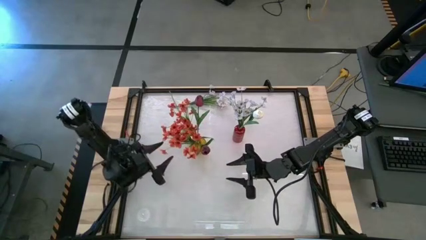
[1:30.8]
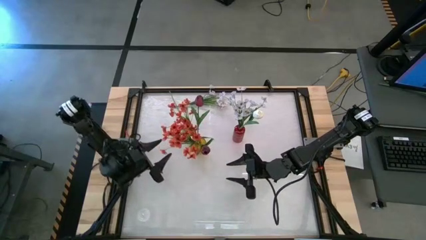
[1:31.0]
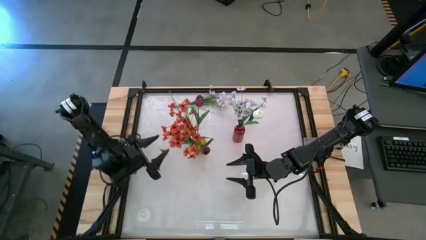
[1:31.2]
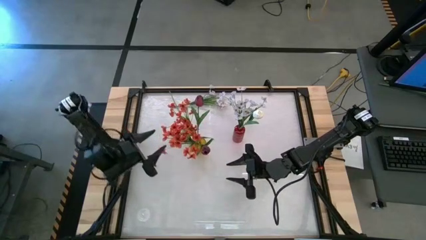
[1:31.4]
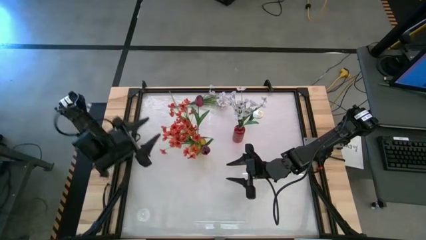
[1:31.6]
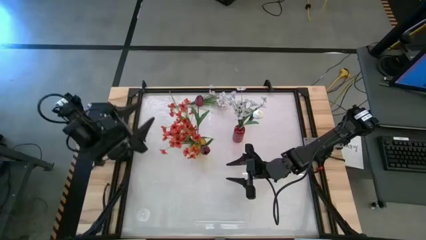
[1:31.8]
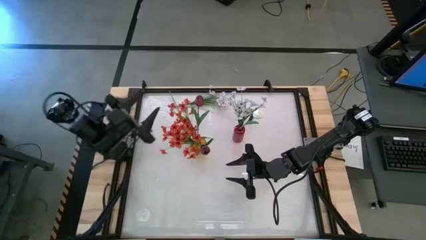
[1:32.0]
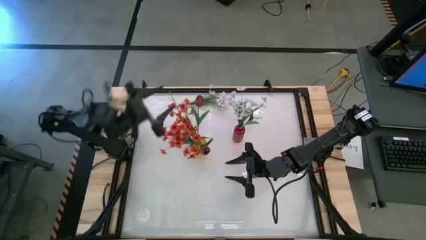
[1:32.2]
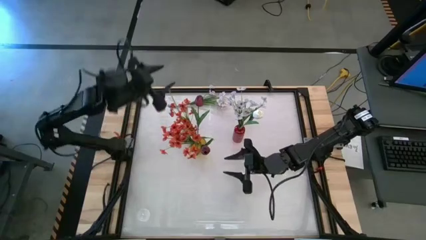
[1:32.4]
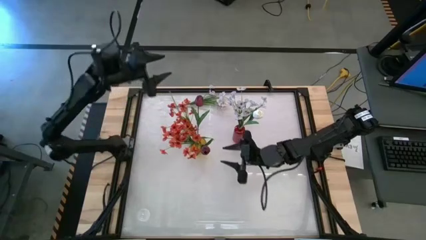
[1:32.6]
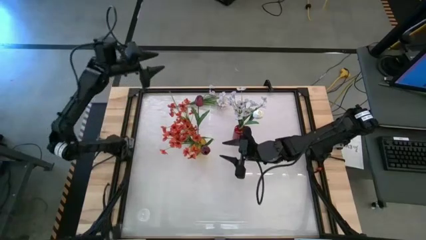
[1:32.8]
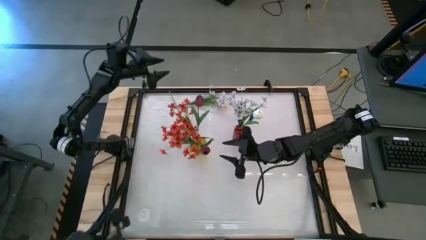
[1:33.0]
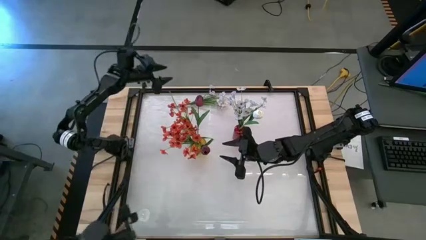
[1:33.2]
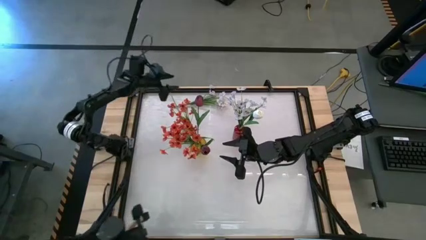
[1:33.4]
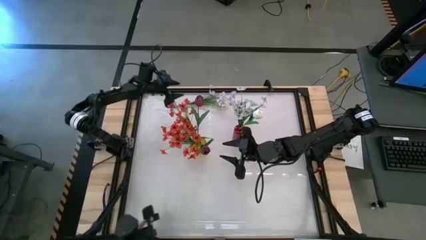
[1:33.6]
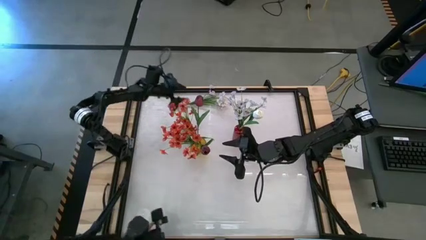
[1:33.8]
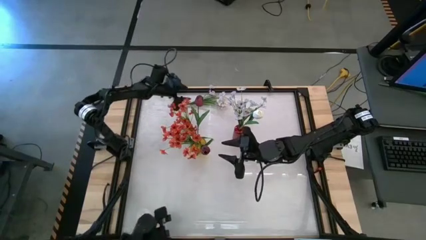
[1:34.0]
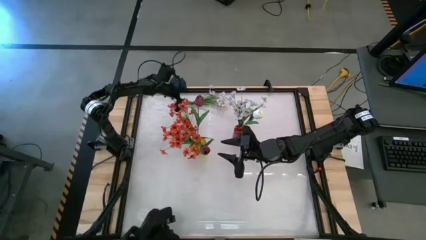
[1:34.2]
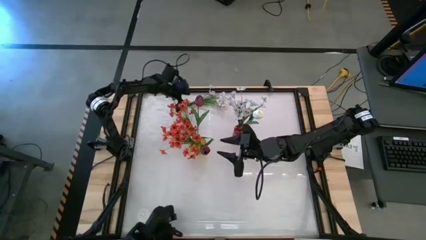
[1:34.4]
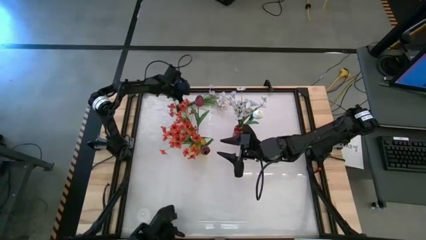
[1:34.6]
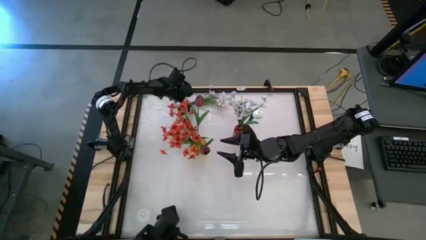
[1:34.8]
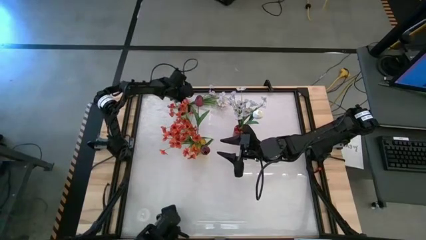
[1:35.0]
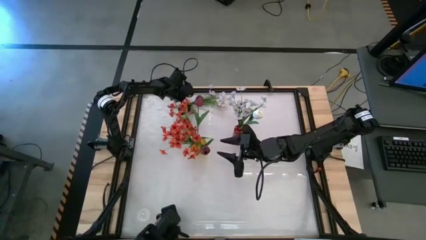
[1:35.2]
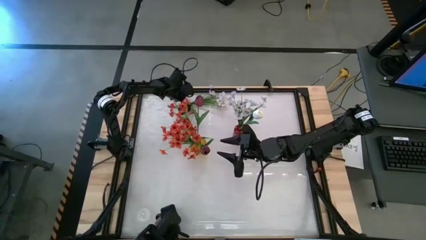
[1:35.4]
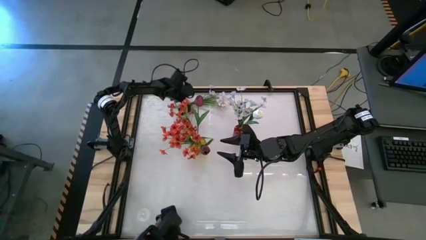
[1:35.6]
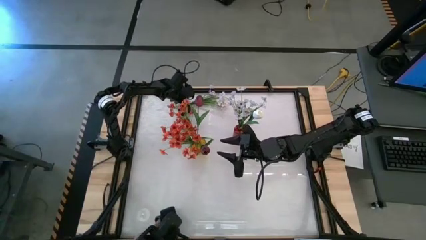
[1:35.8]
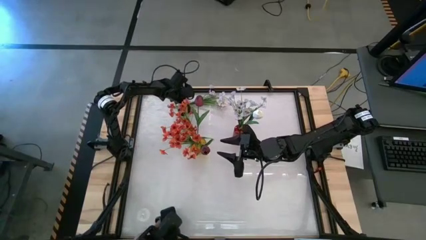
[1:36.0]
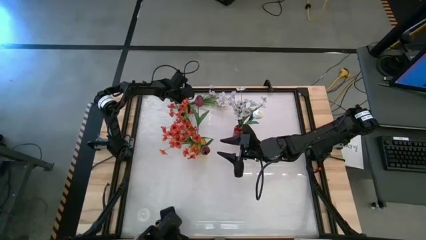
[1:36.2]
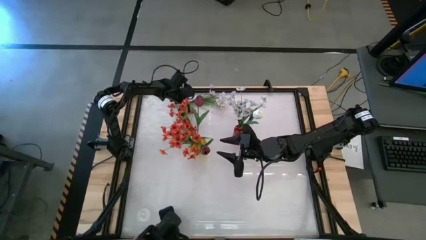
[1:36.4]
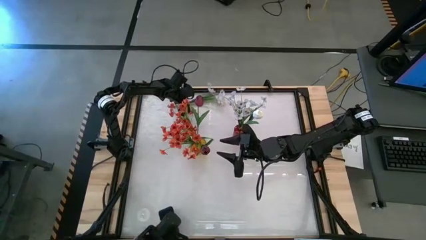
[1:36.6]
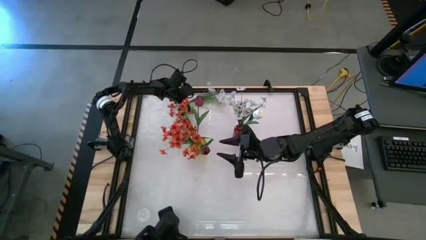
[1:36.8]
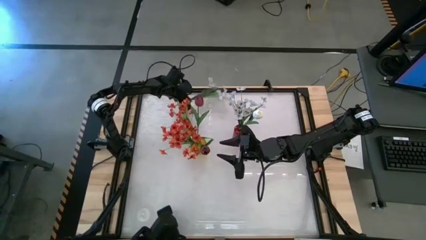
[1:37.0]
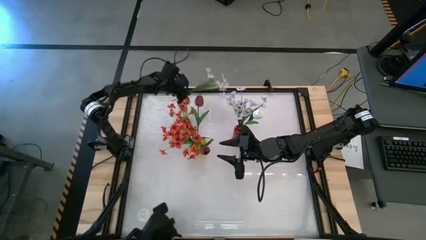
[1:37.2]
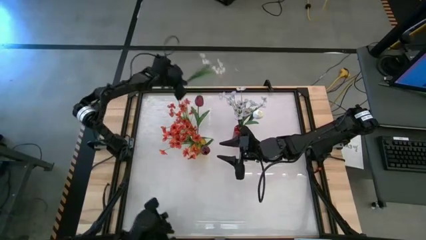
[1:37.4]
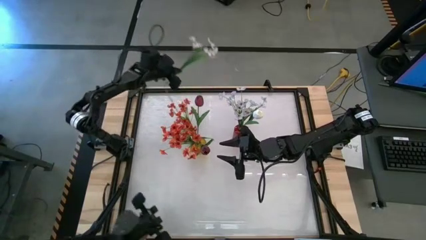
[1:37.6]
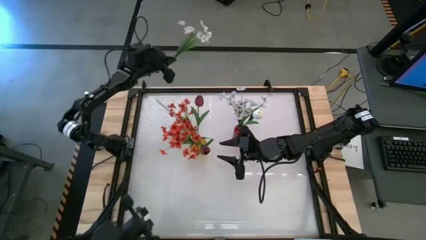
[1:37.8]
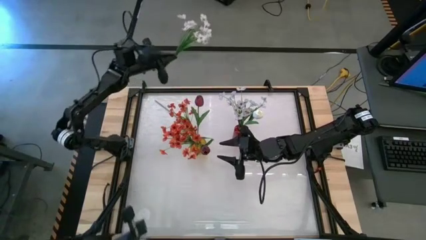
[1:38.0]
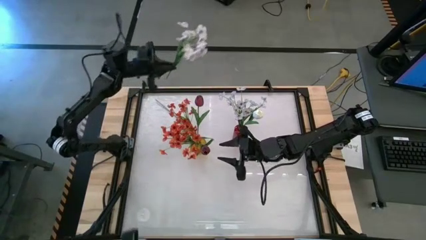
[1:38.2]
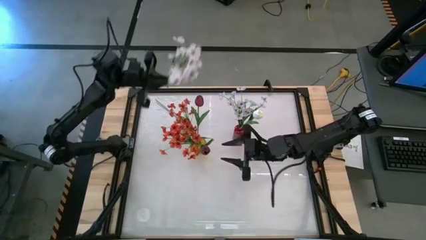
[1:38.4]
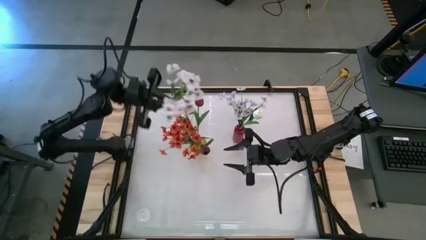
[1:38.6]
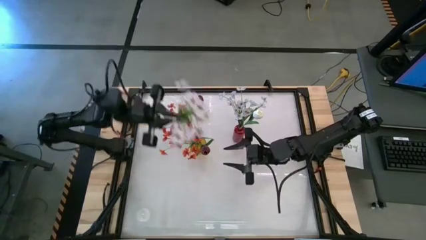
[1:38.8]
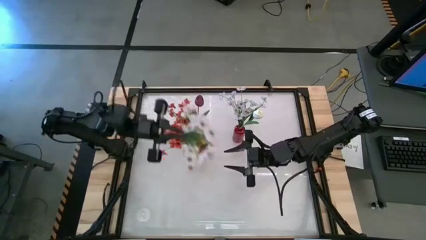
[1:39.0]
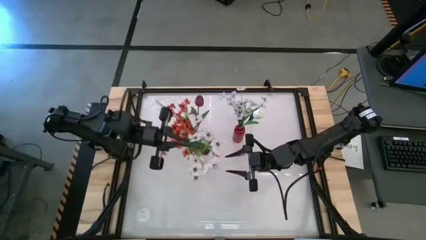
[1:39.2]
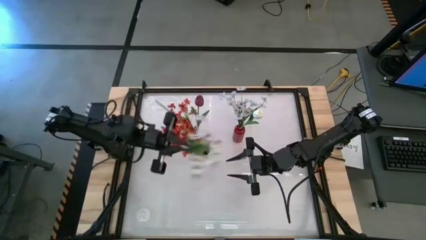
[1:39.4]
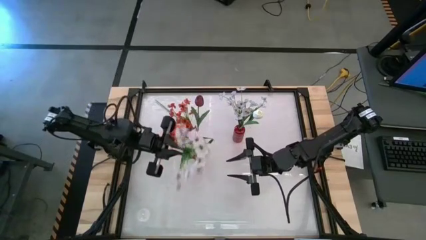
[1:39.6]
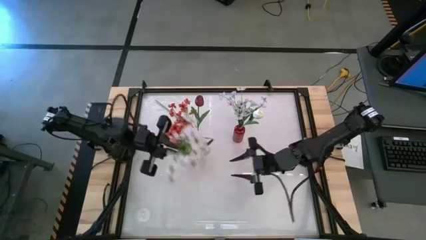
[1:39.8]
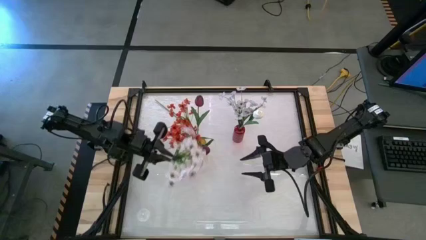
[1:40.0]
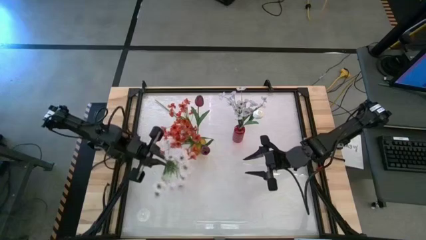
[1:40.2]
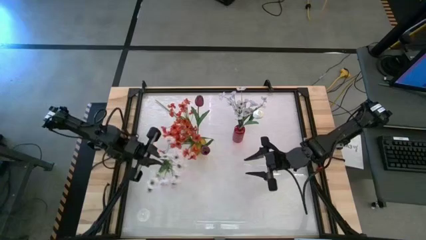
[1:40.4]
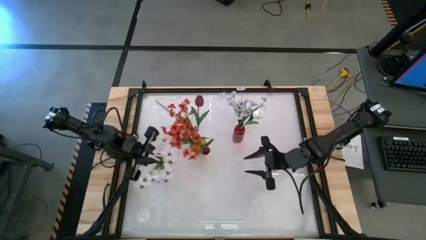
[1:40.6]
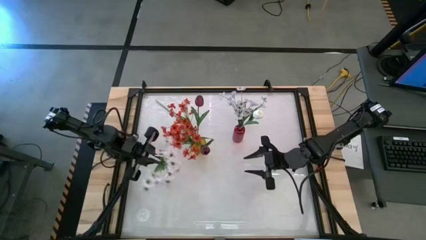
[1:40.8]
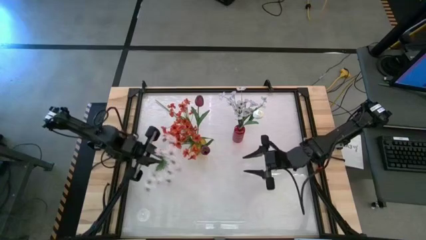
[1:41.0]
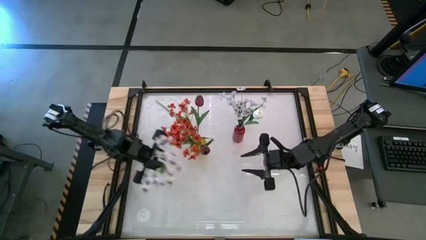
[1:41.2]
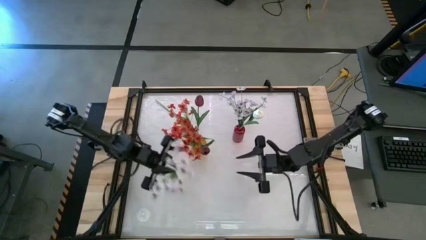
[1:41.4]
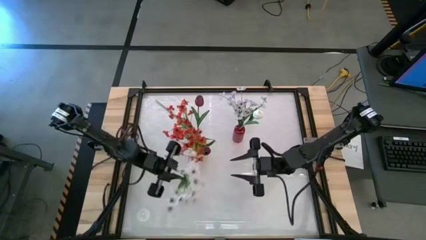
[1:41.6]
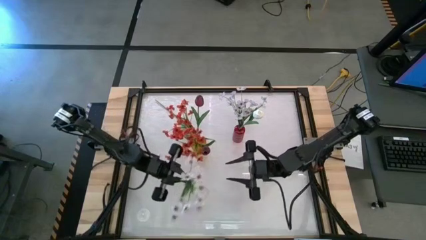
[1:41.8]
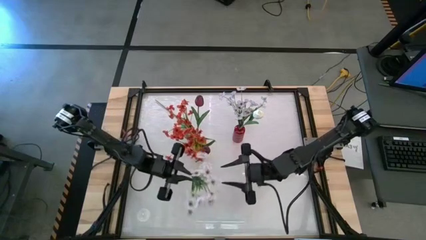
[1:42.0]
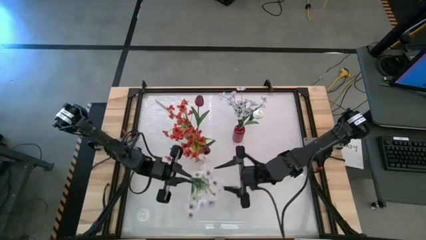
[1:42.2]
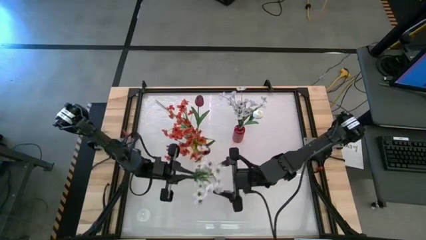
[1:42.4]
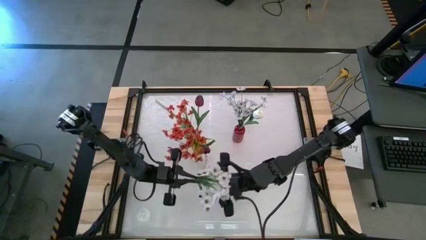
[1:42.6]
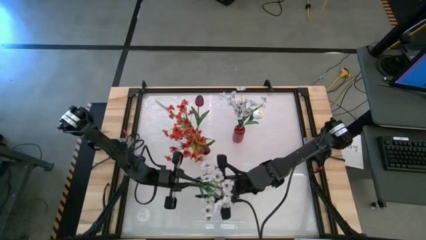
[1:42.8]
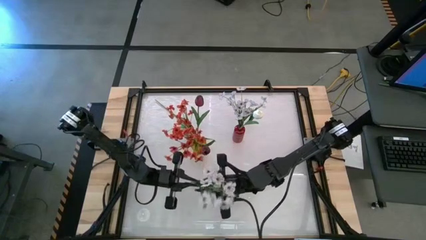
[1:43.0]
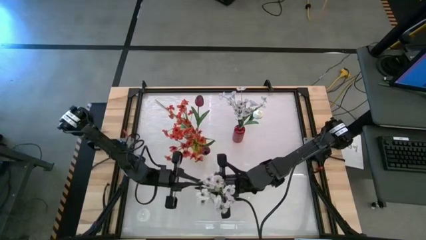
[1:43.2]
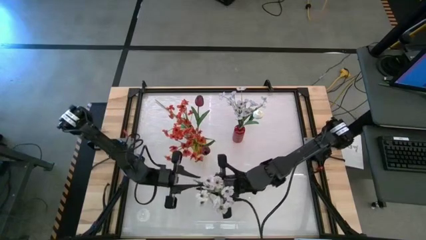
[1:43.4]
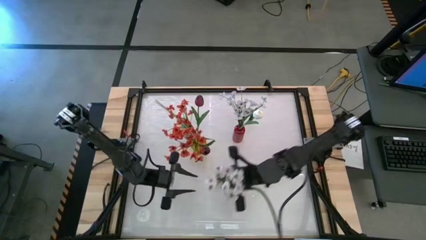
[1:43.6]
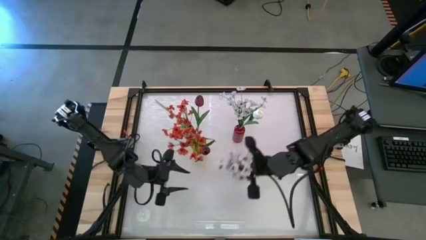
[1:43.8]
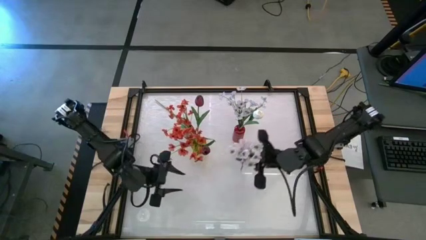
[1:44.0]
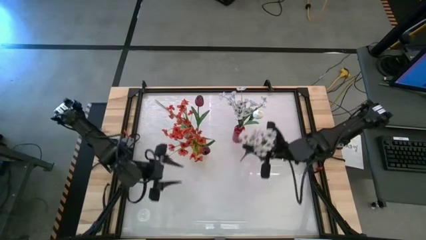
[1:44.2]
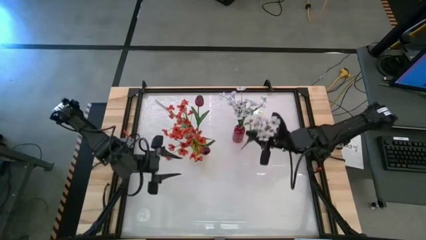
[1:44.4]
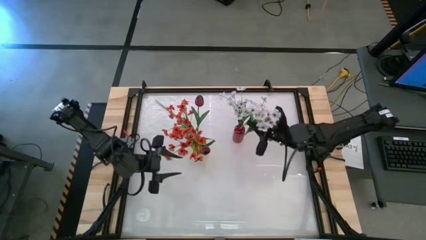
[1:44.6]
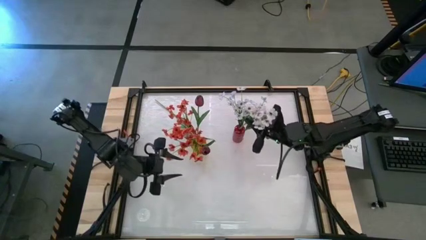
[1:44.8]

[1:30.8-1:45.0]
Task: Sort flowers into vase by color
Put the white flowers into the red flower vase
